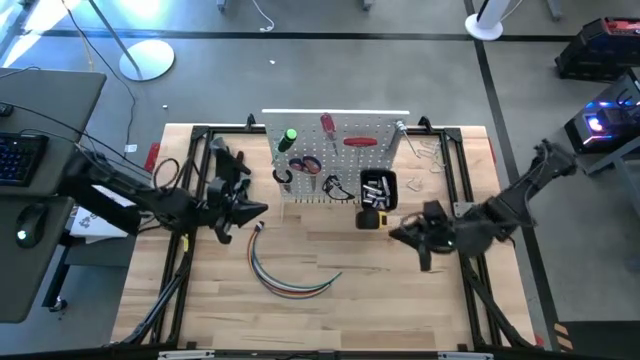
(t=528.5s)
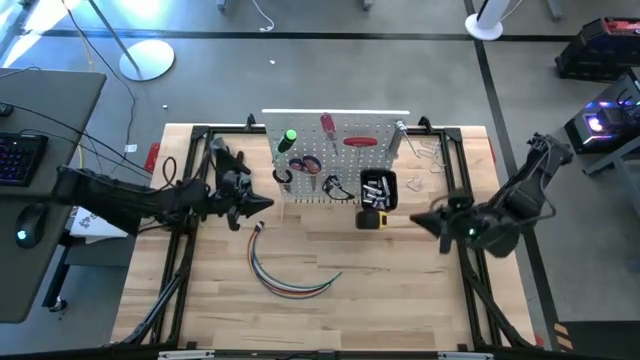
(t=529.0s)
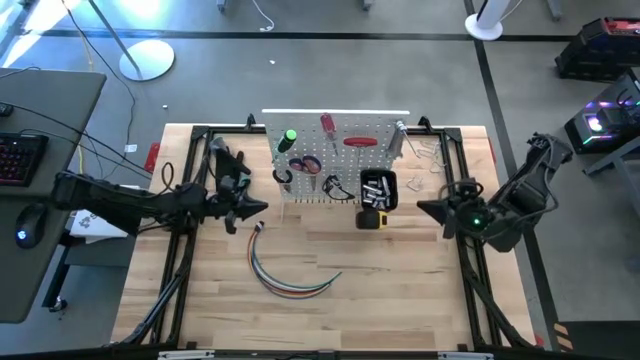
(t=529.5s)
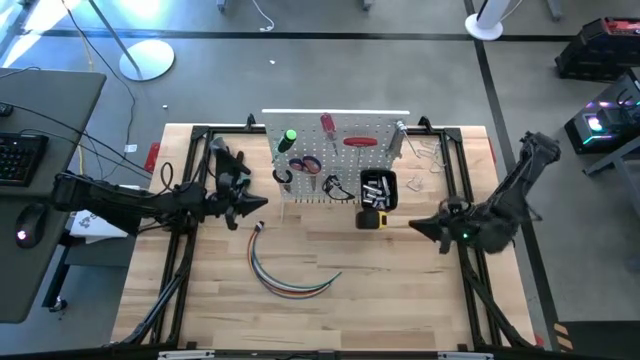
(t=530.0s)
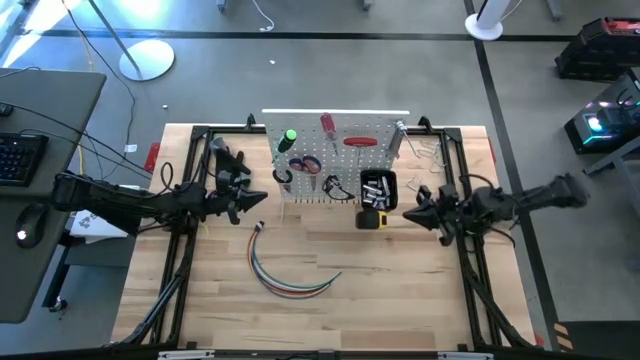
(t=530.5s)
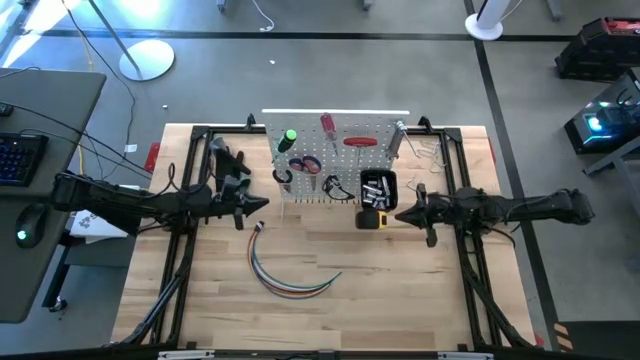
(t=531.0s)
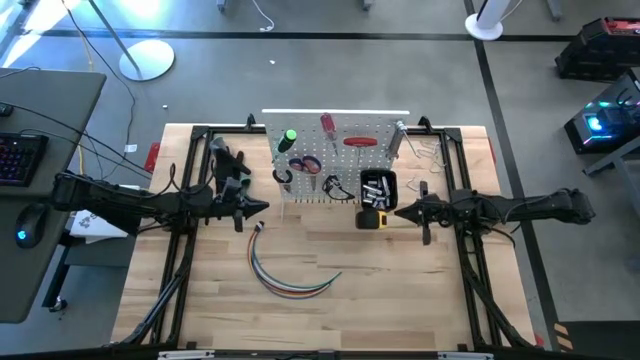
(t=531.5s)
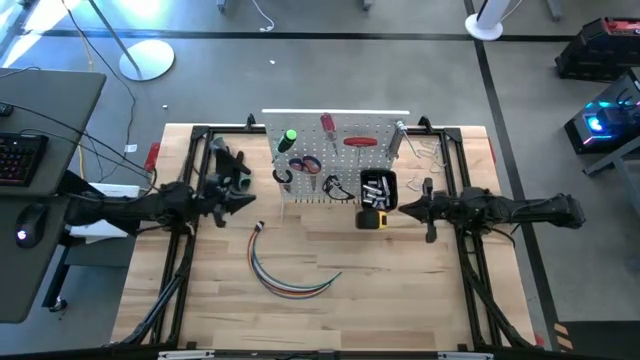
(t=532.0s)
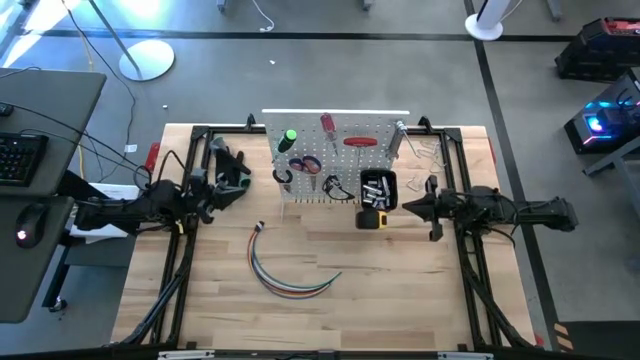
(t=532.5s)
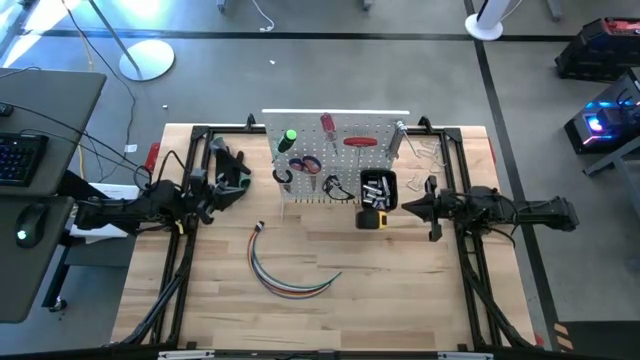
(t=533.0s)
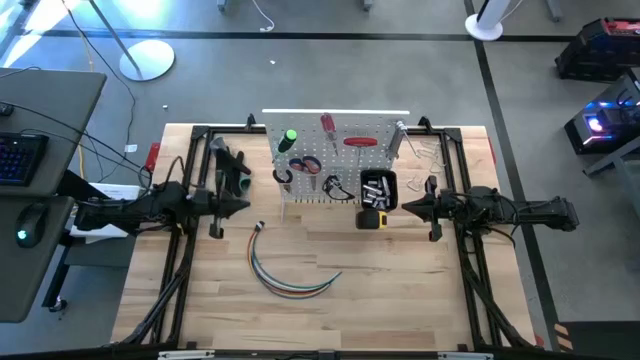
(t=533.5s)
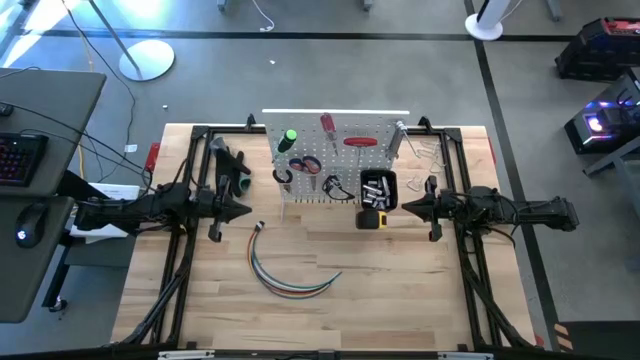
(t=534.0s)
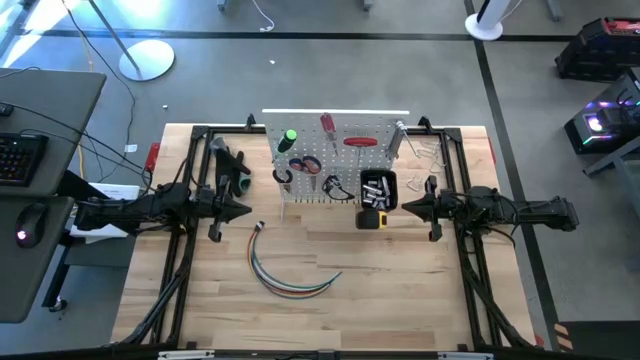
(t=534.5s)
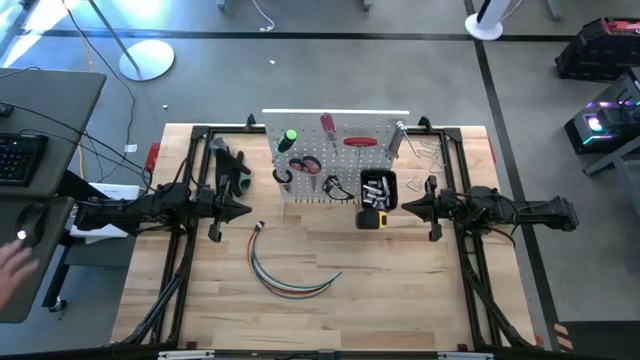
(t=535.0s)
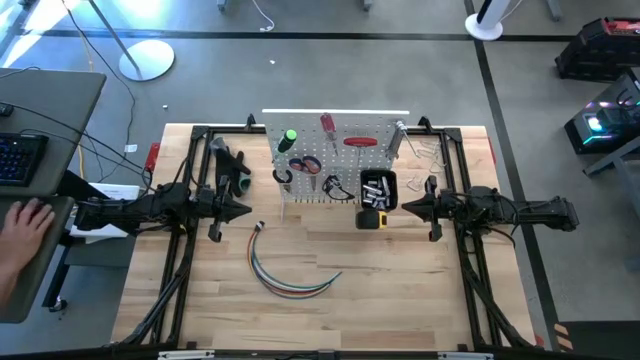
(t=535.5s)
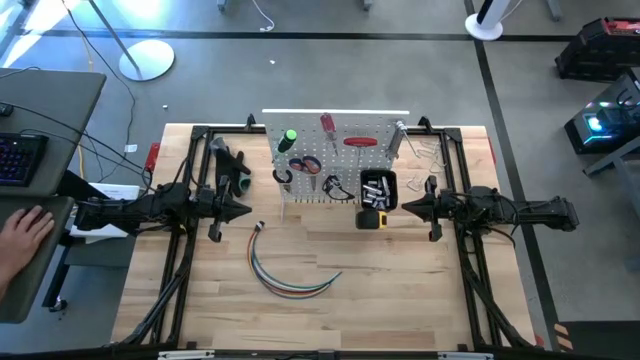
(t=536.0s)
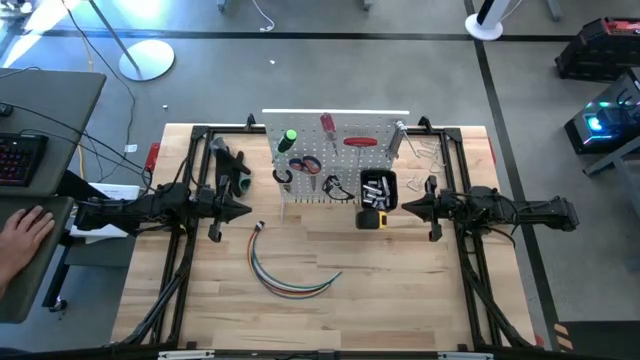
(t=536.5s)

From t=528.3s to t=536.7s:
Task: Hang tools onto peg board
Return to Home Position

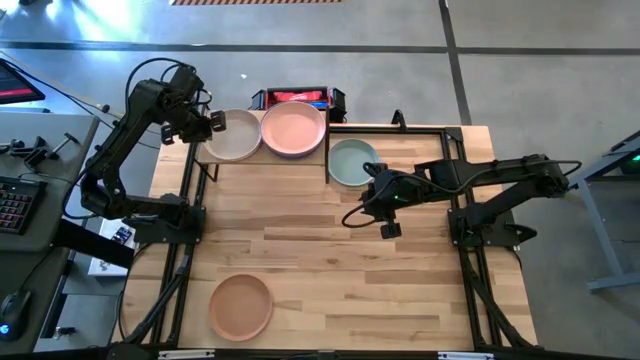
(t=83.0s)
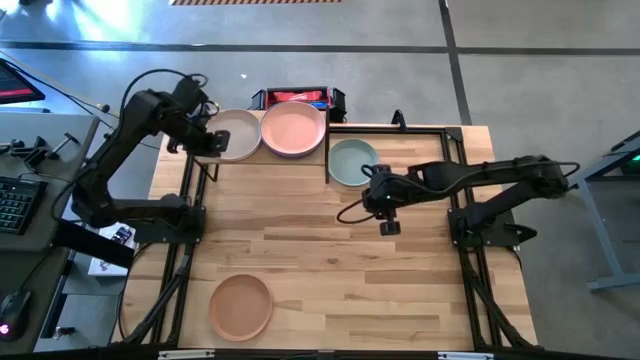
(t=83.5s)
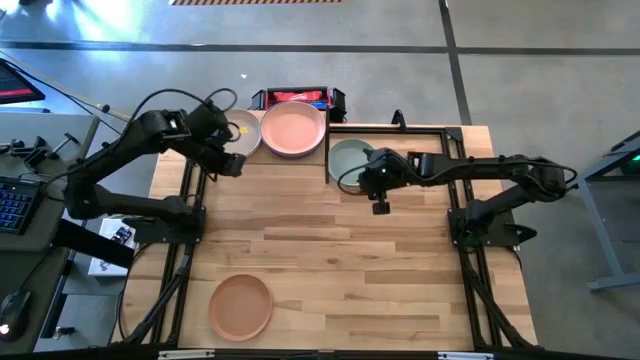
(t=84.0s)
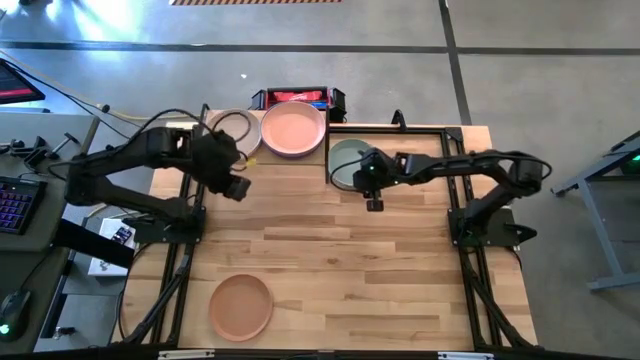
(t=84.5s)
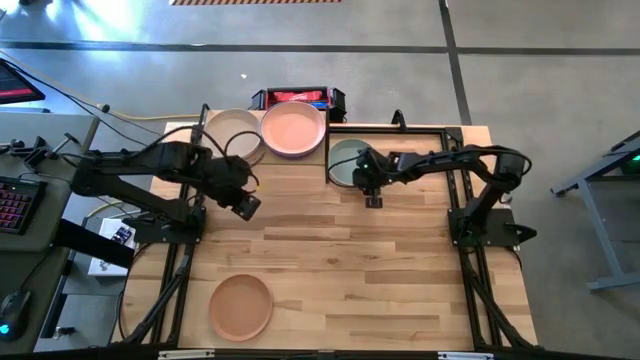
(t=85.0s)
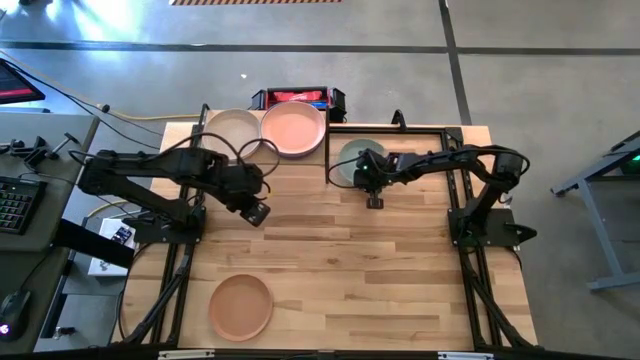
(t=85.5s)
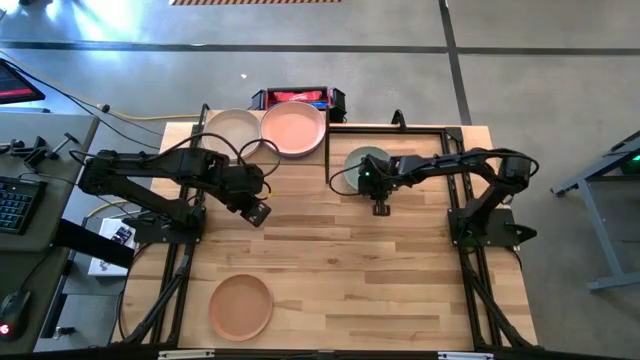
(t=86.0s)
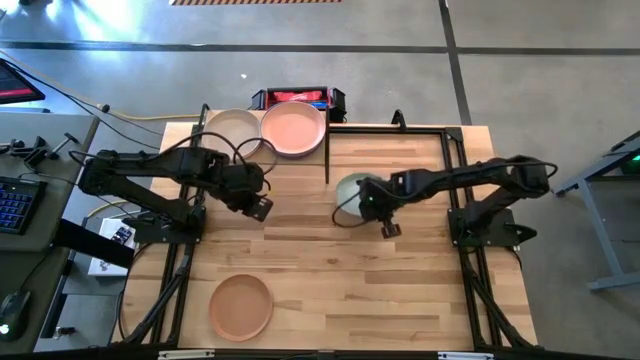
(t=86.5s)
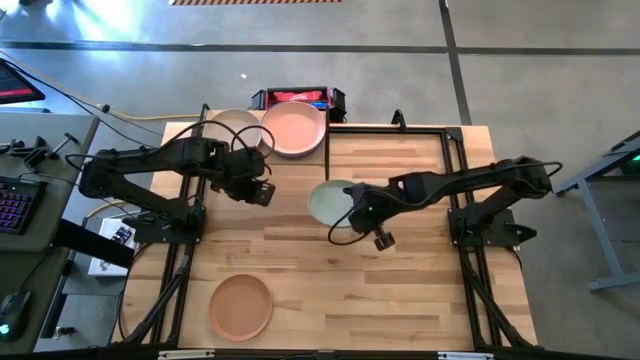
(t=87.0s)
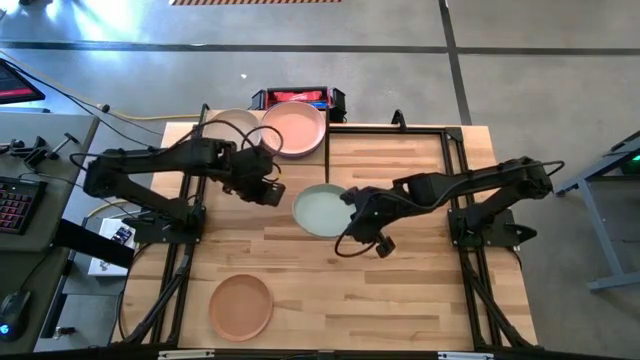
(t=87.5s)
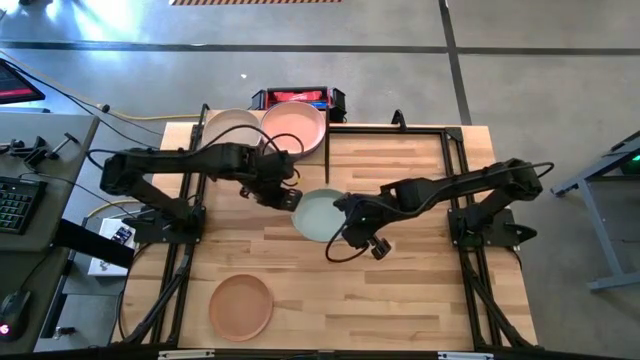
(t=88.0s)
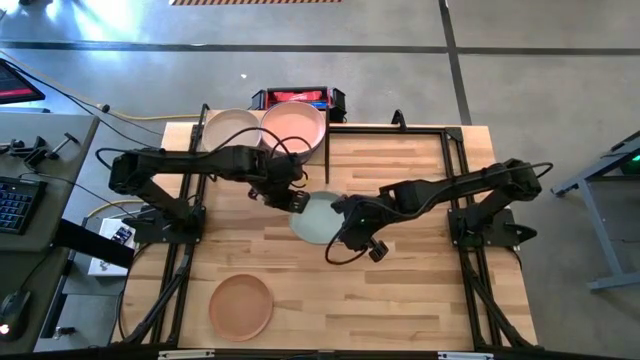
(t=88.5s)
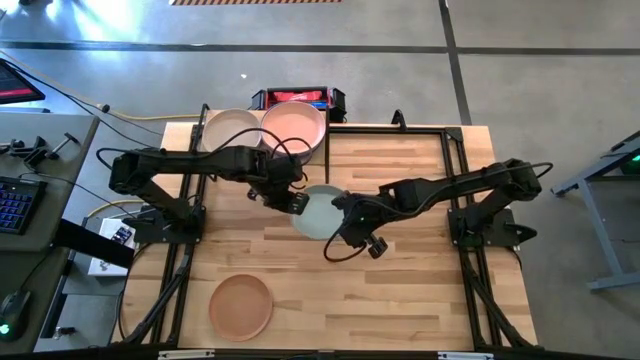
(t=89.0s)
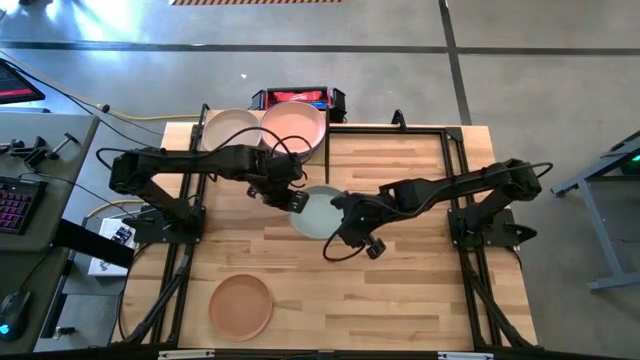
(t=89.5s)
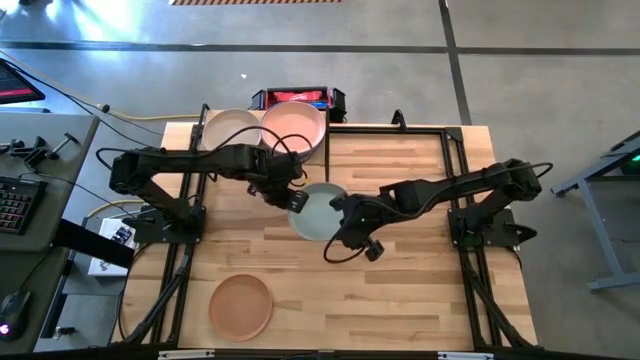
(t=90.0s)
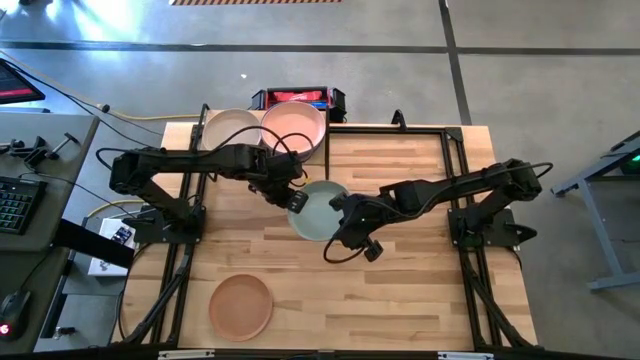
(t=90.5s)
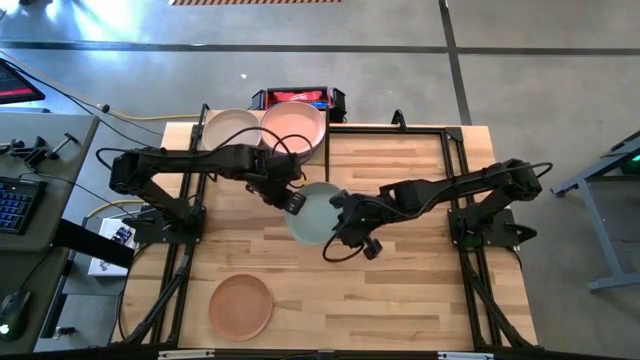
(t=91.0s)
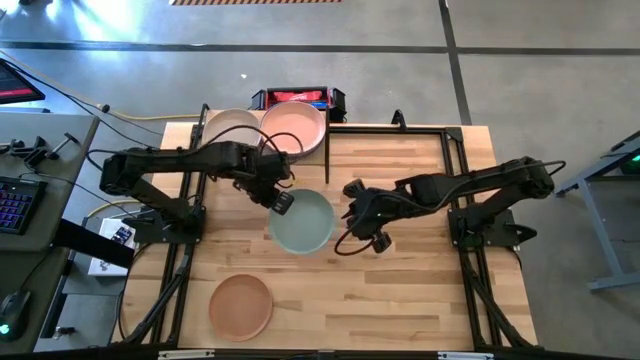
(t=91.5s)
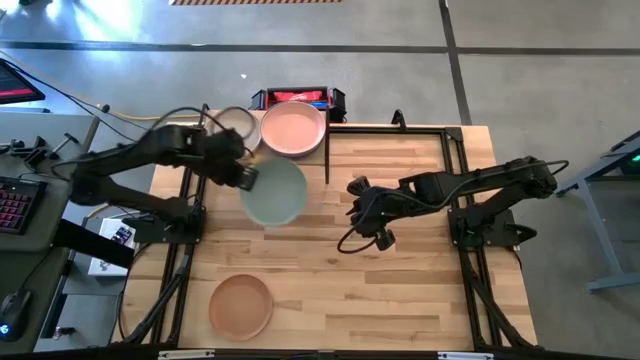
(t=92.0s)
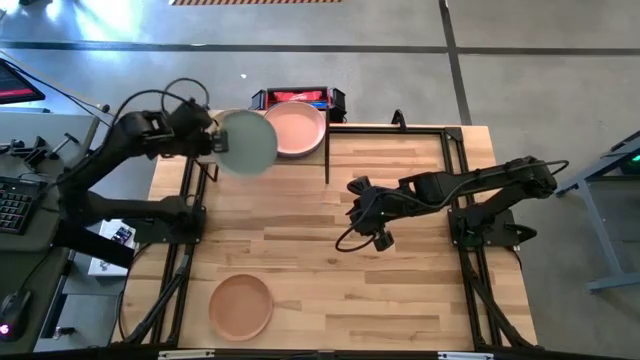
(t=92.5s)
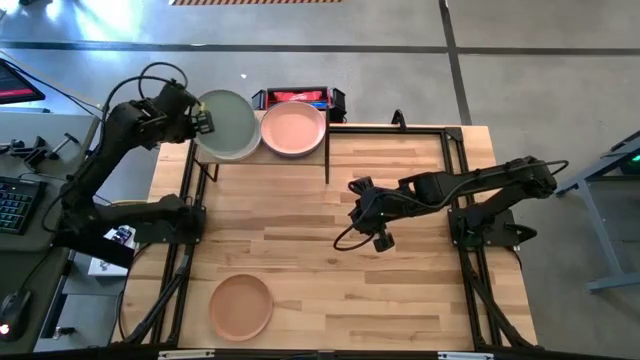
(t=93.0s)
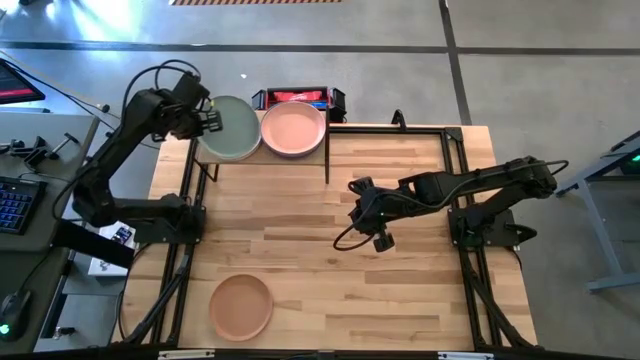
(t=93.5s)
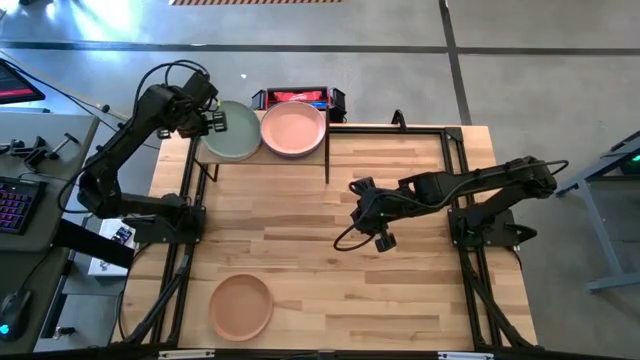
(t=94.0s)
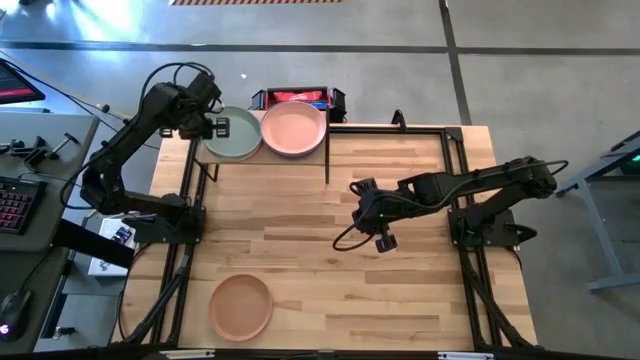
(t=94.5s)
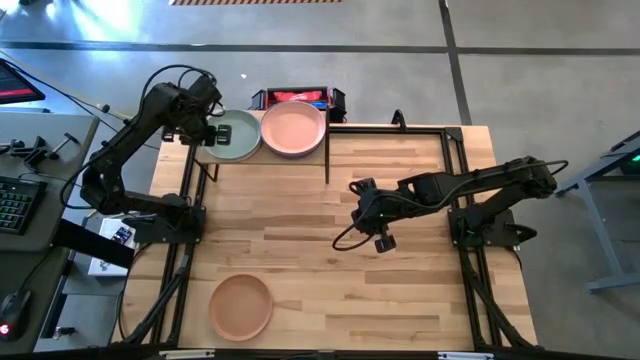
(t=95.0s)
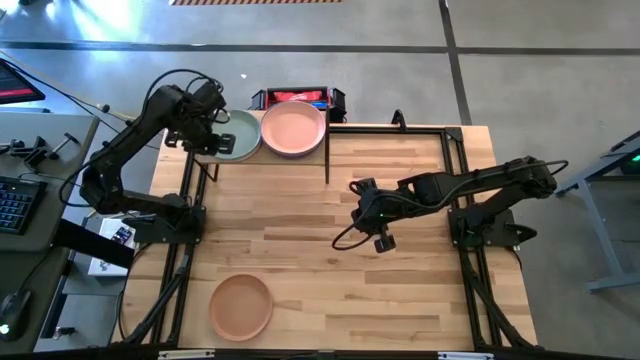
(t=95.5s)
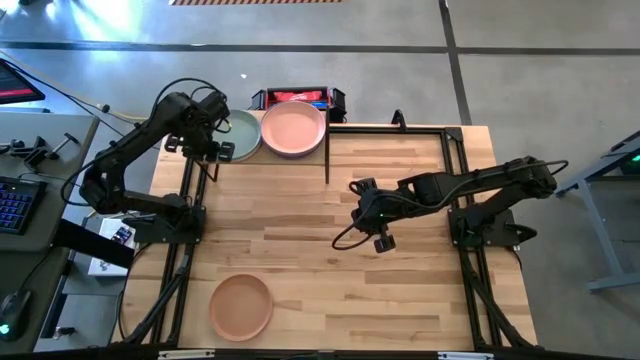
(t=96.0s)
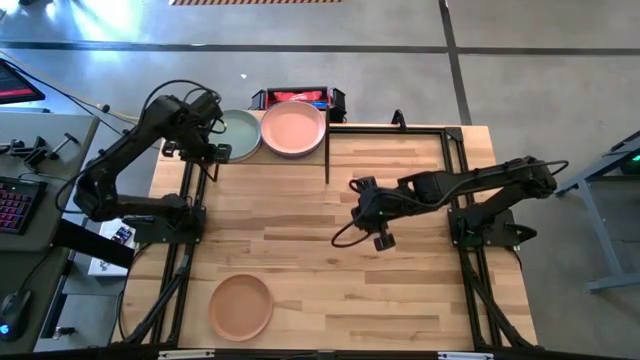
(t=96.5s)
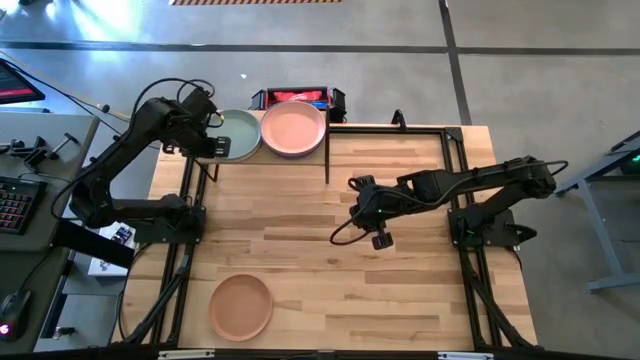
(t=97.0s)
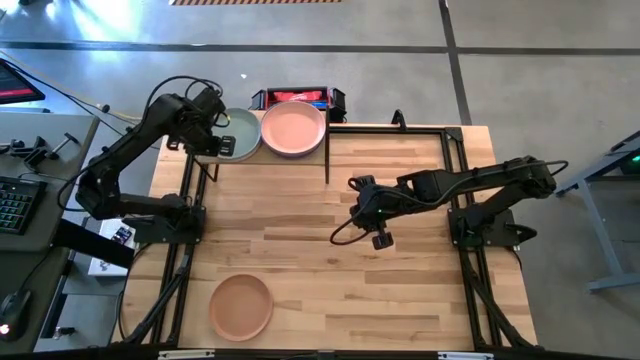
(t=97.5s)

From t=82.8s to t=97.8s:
Task: Place and stack plates onto a shelf
Stack the light blue plate on top of the gray plate on the shelf
